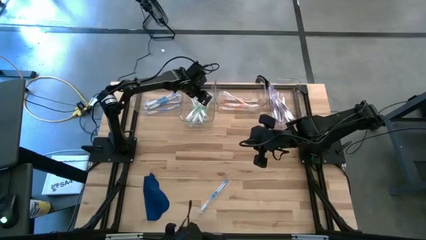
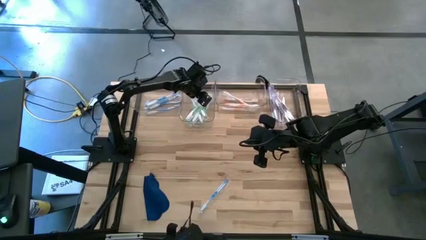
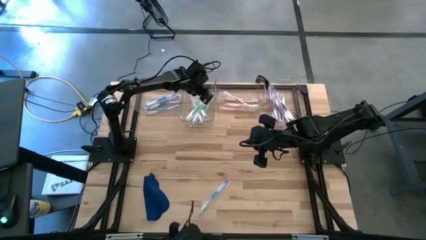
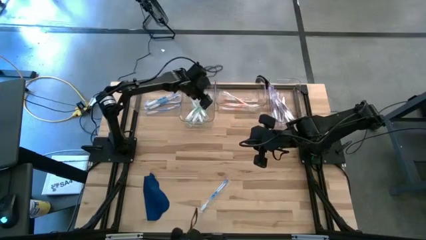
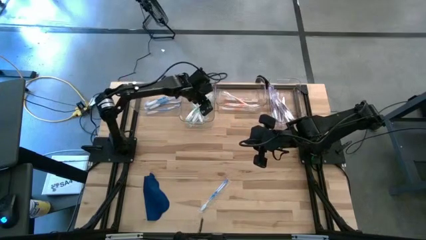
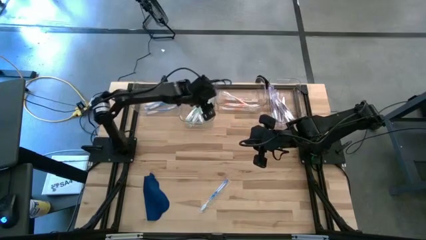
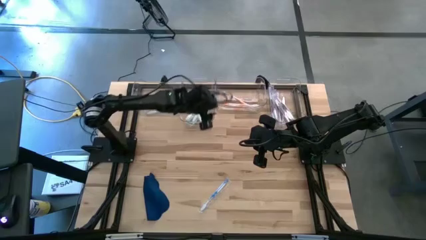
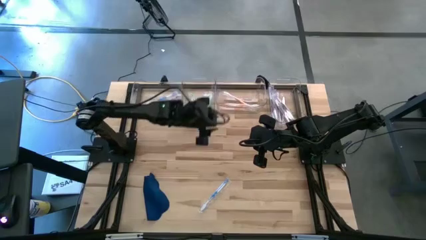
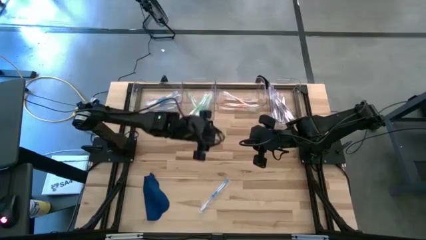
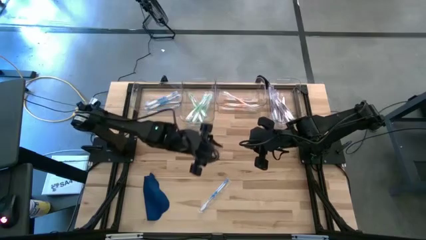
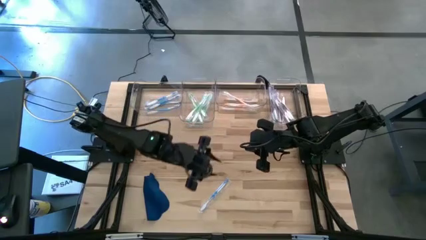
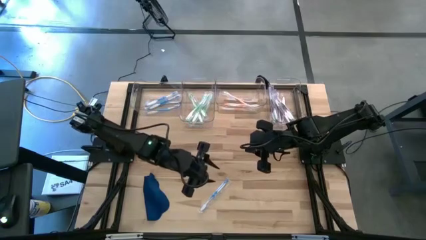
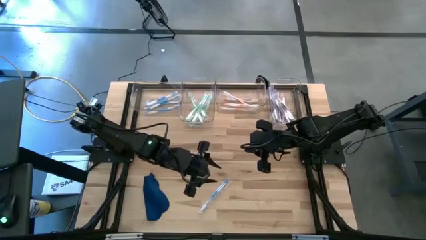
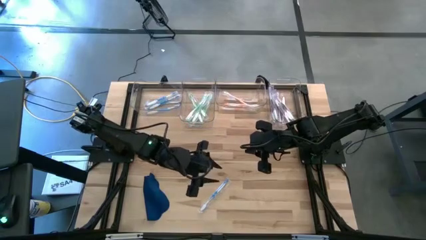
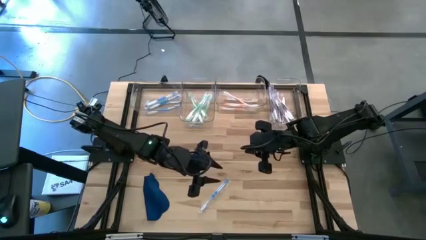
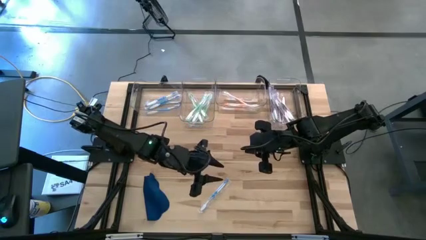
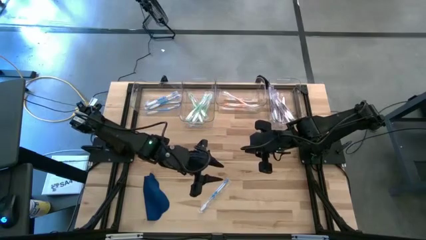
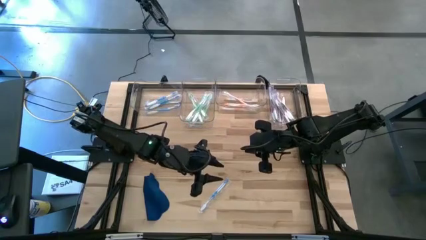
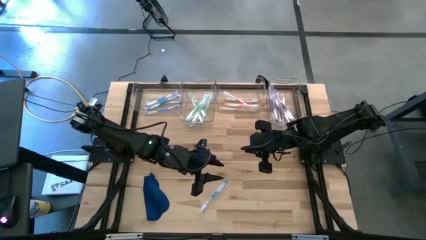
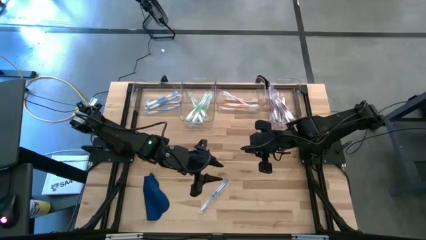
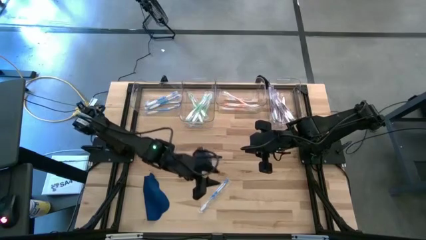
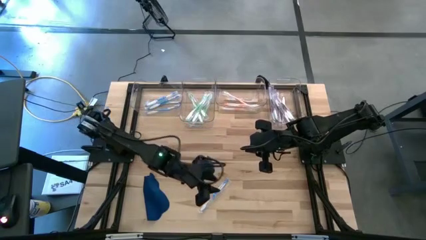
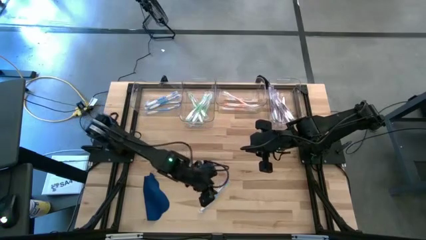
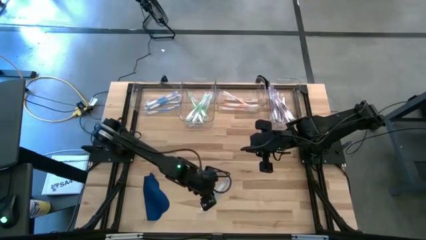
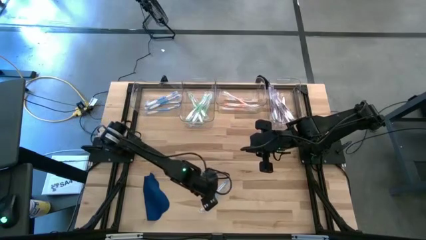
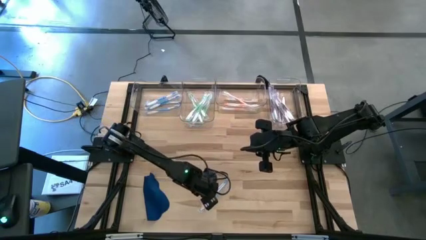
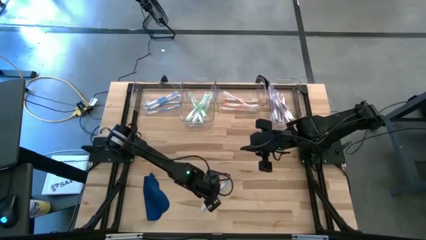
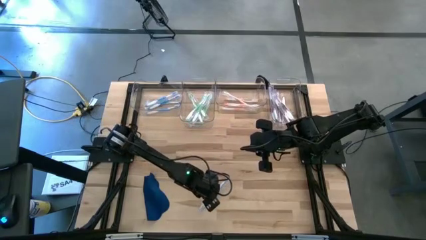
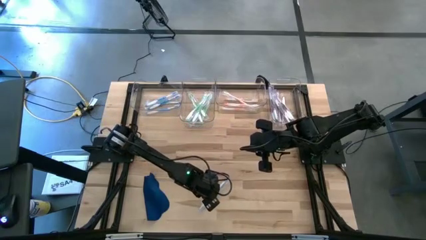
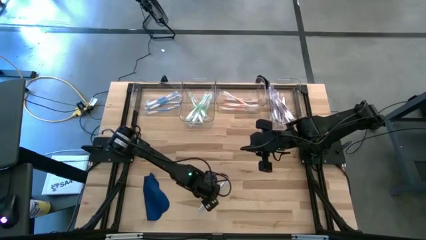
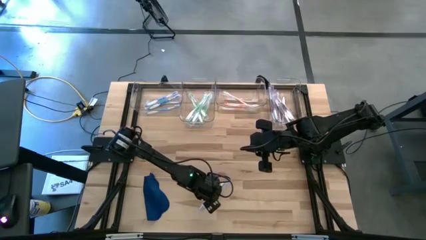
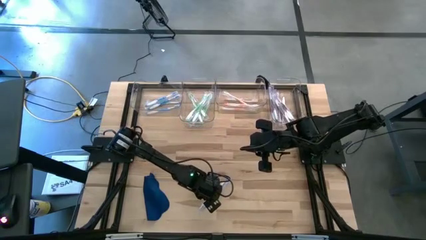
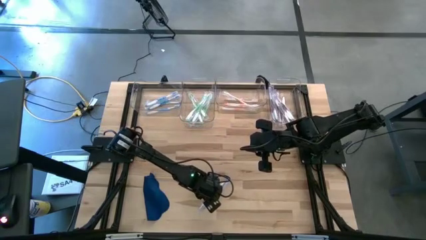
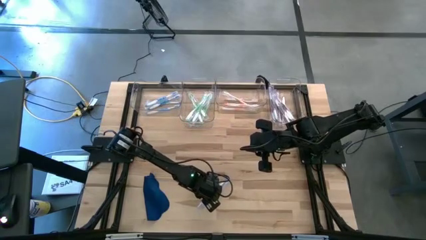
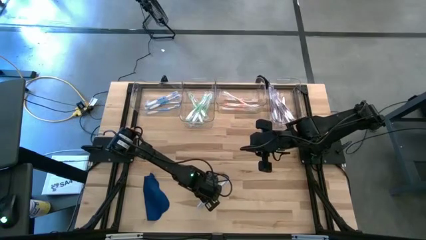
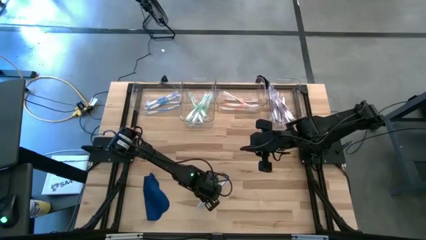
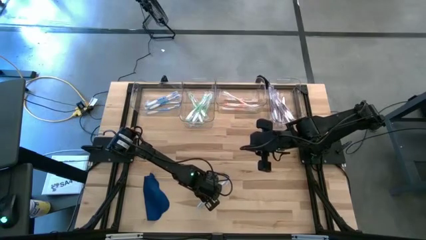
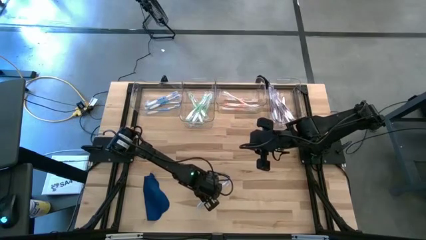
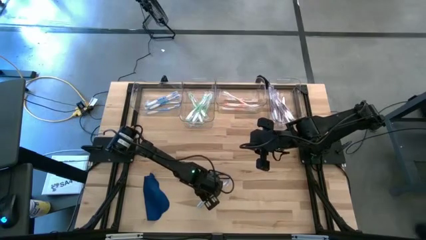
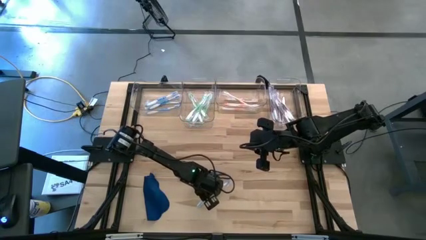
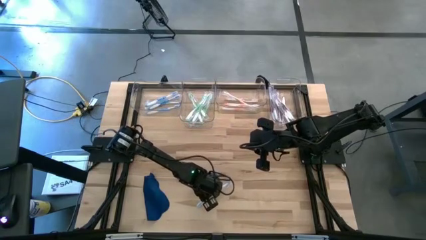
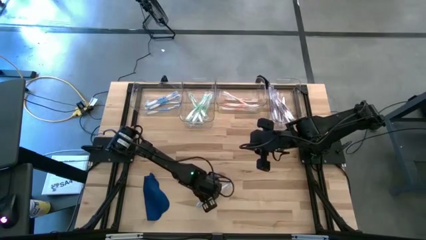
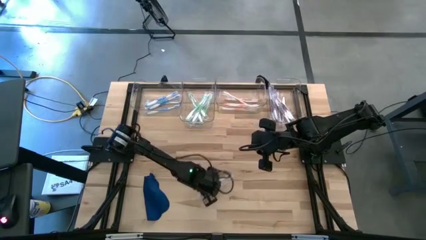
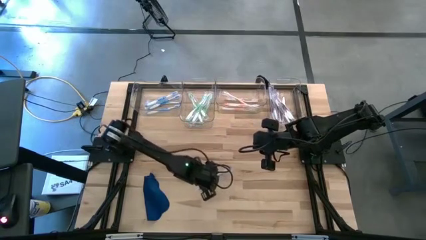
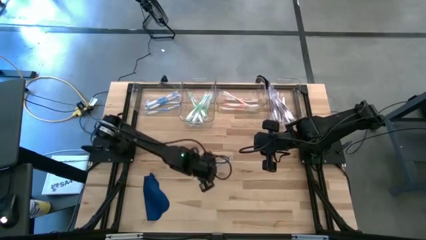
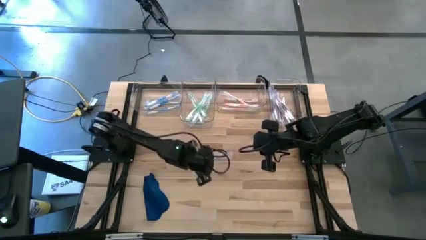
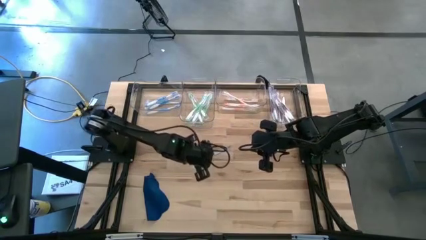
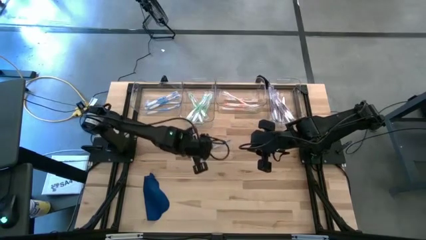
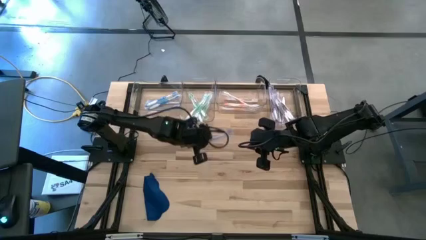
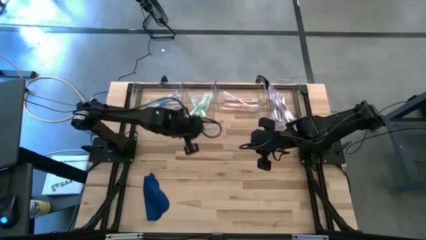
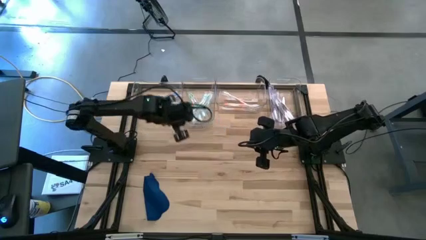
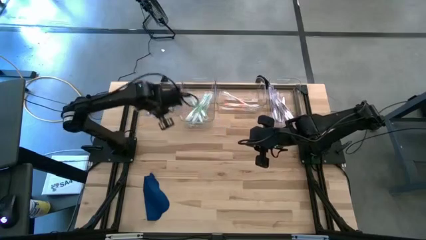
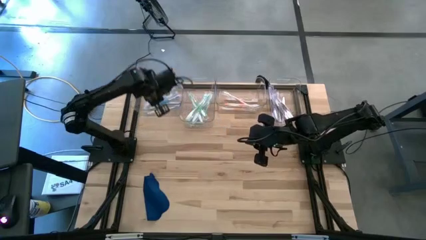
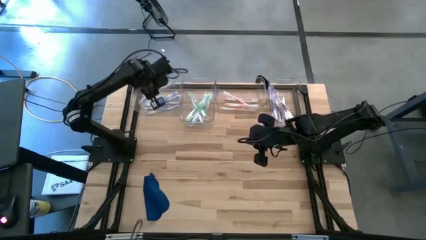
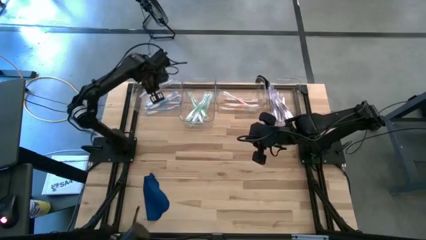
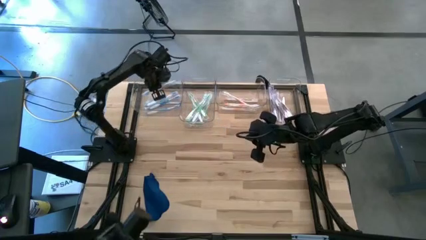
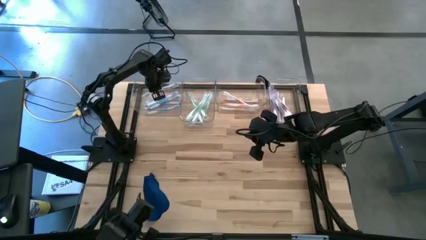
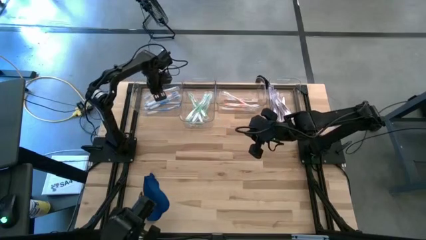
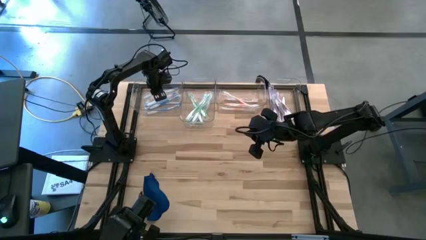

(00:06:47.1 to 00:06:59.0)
Task: Pick & Place Toothbrushes
Put the blue toothbrush into the left transparent bin

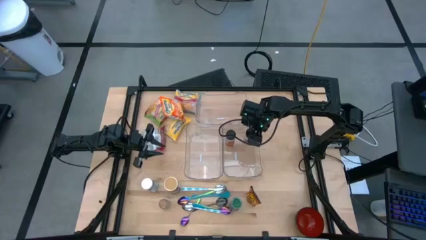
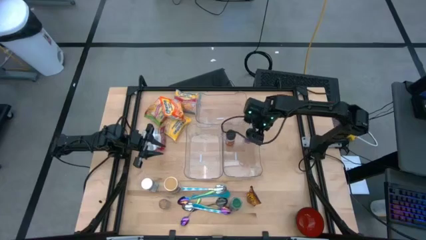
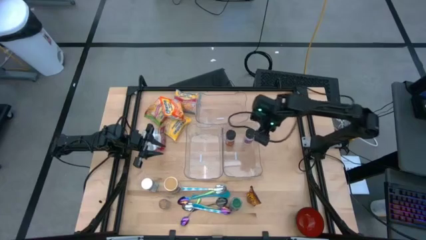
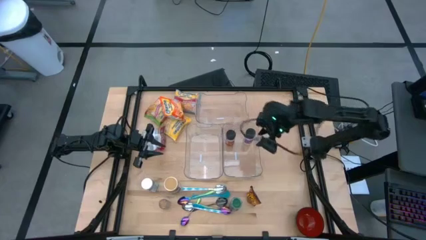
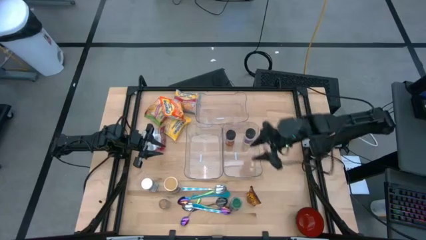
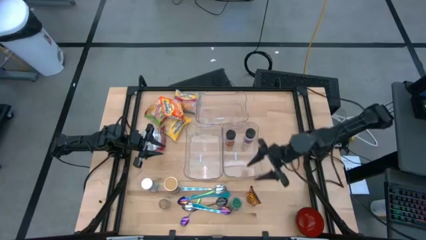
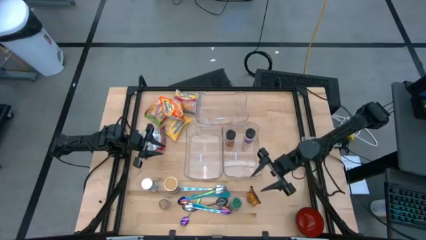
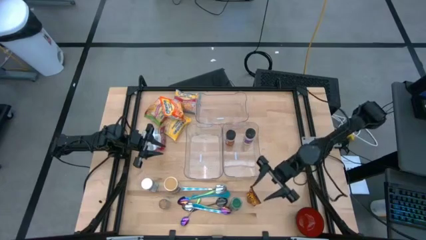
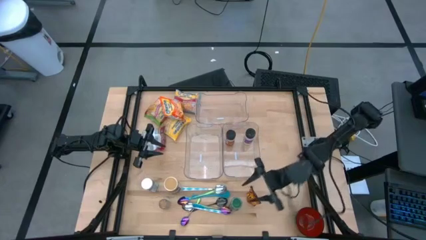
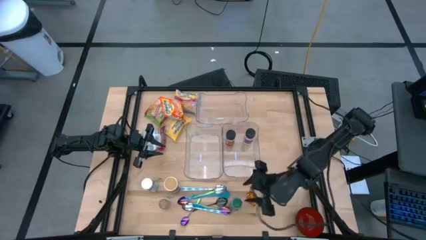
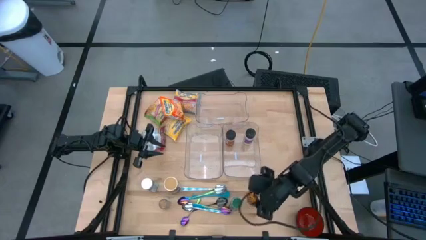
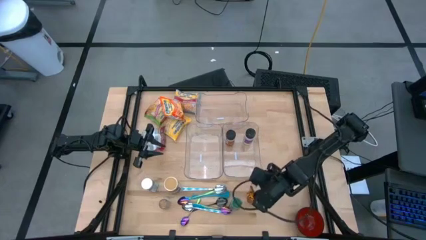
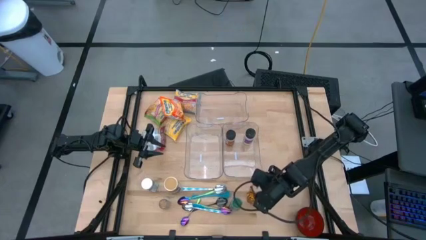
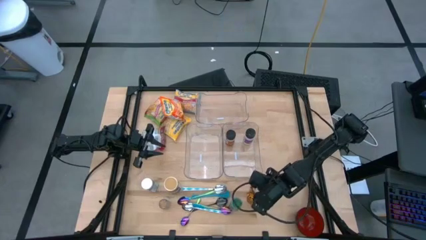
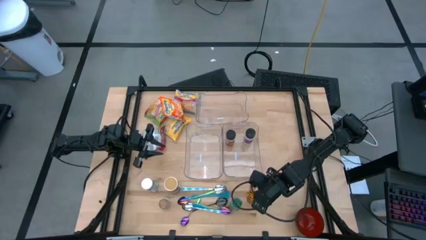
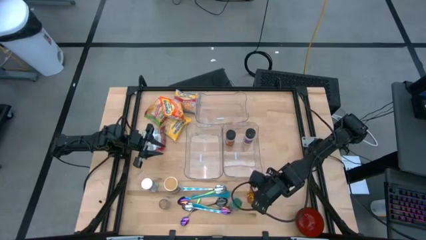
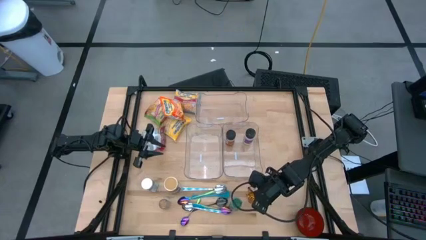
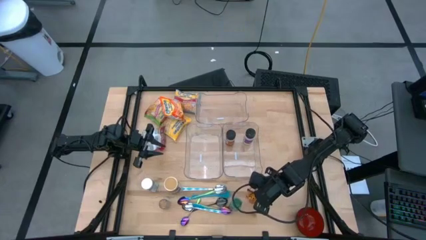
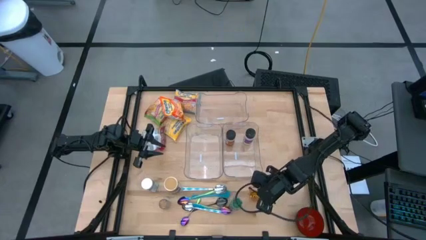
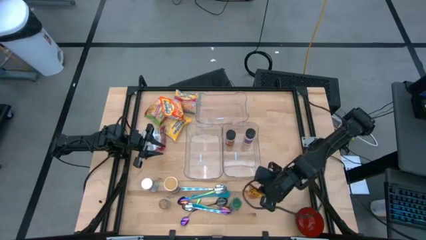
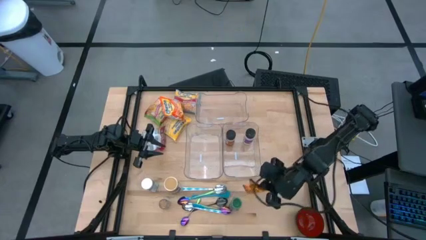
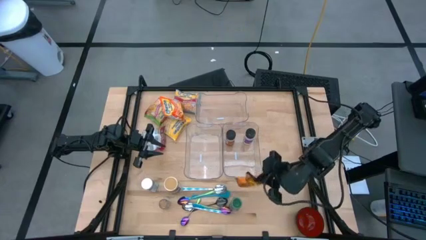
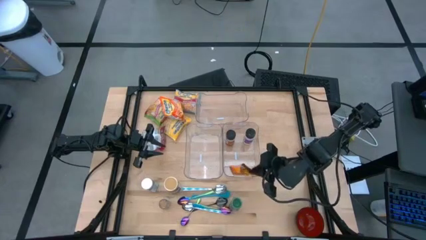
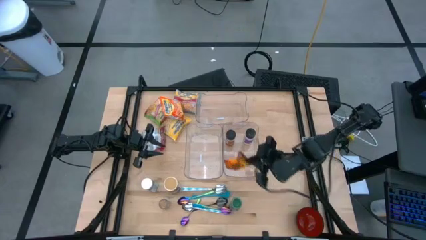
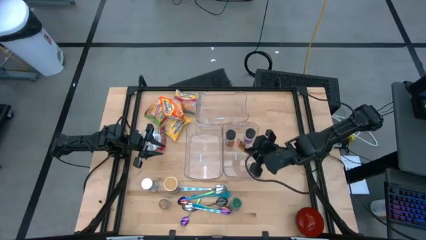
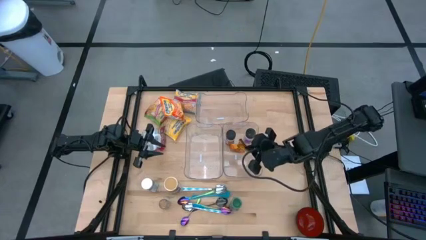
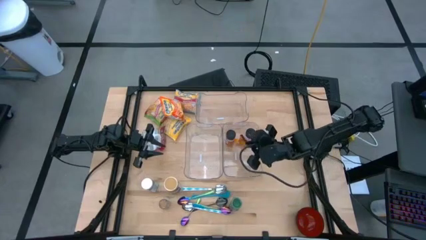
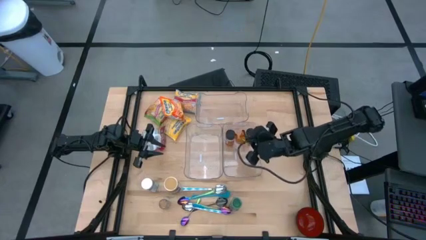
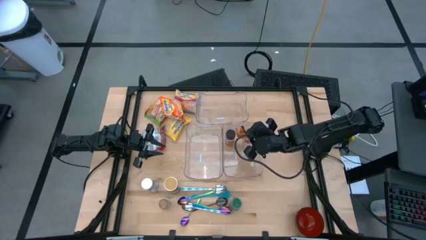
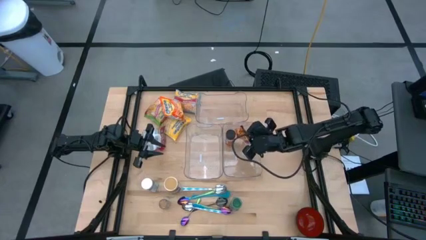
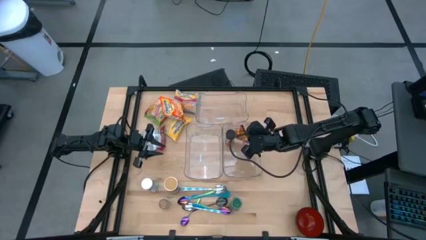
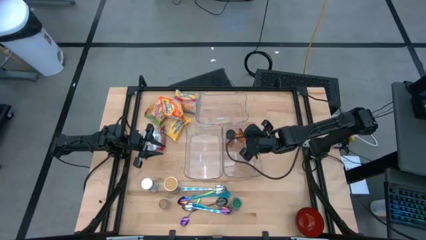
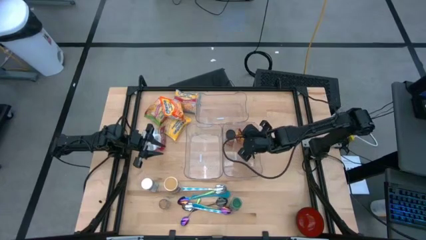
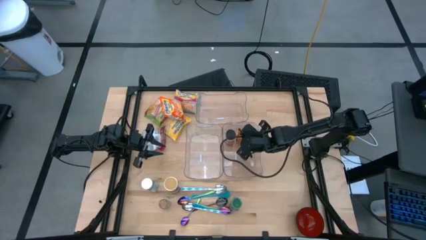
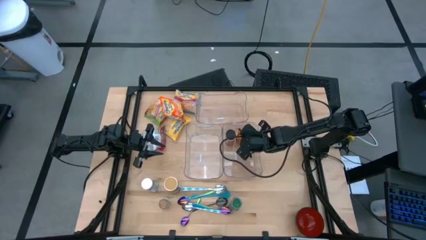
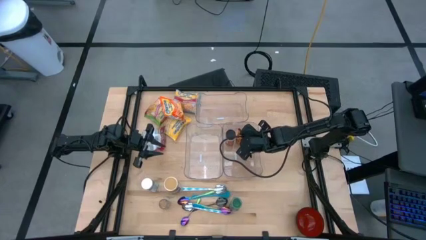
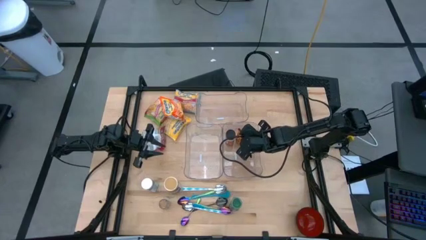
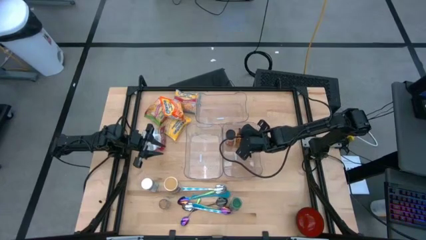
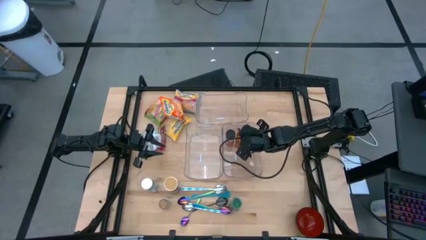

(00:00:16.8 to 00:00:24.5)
Task: Pick & Place Food Item
Put the orange seasoning pack into the bottom right transparent bin
